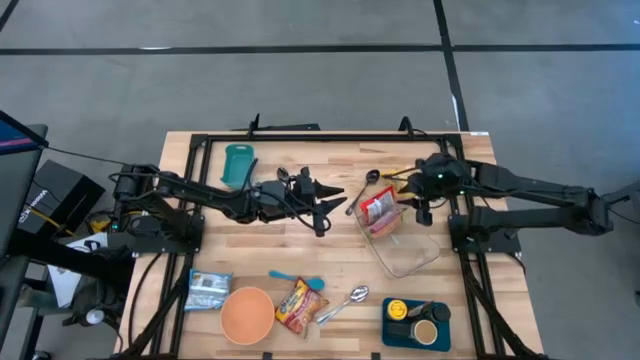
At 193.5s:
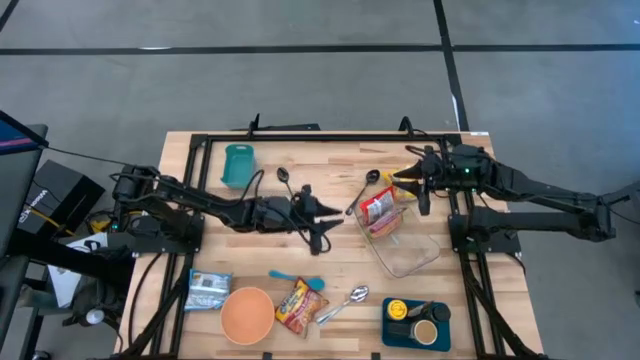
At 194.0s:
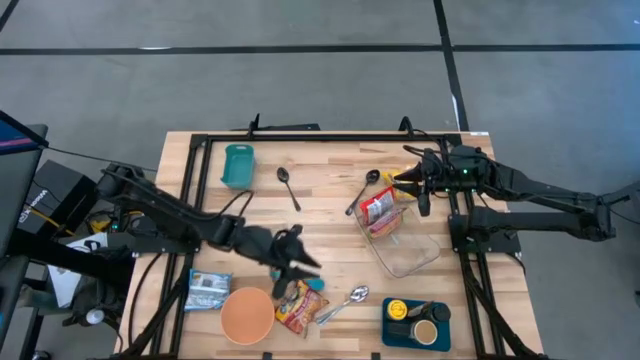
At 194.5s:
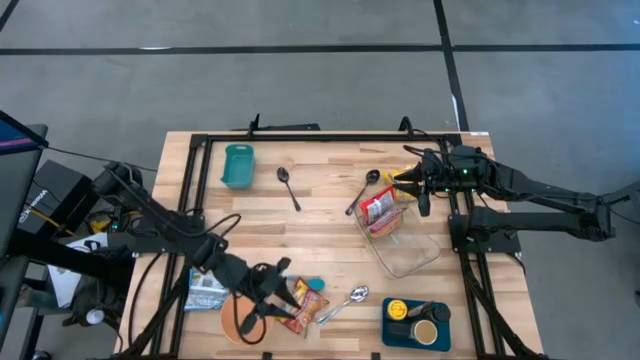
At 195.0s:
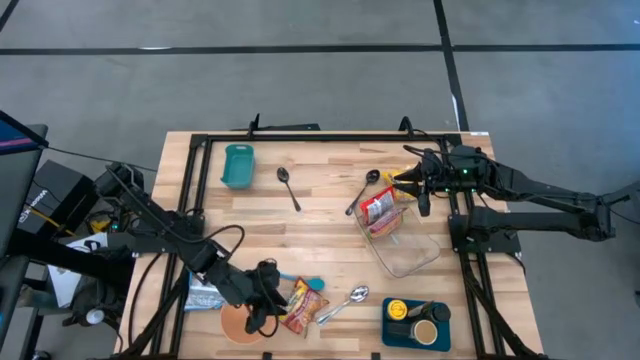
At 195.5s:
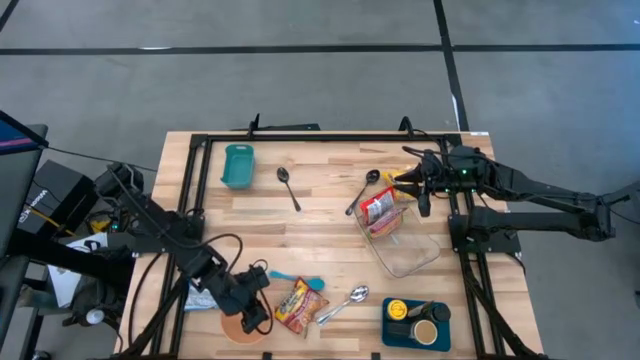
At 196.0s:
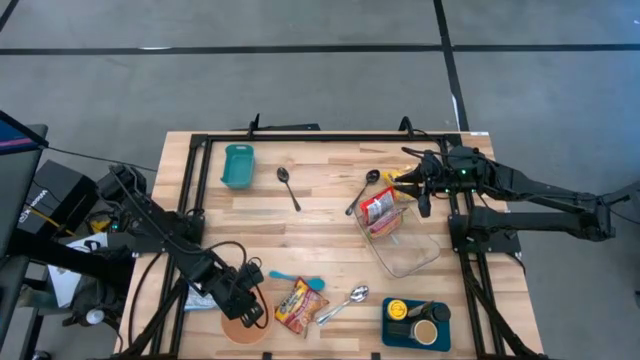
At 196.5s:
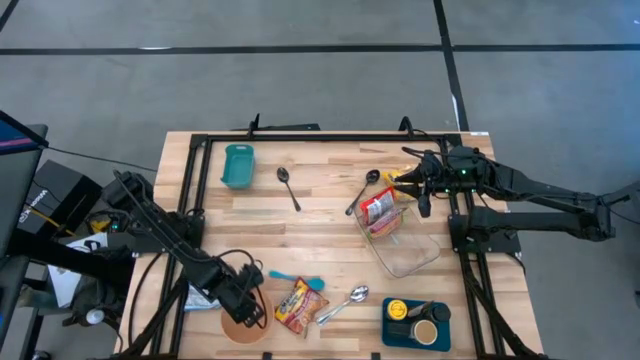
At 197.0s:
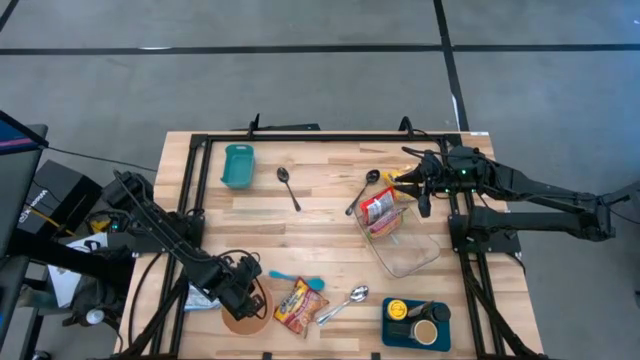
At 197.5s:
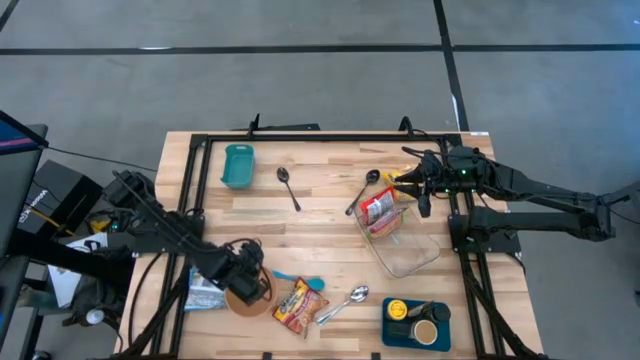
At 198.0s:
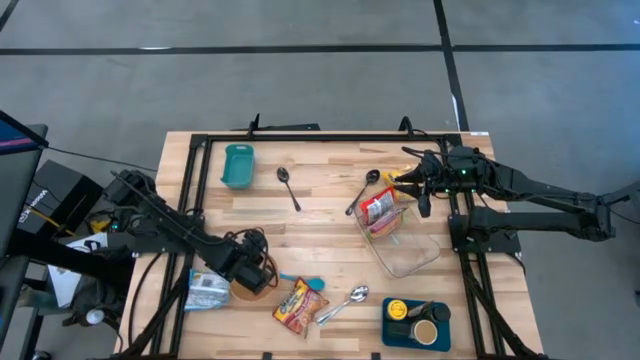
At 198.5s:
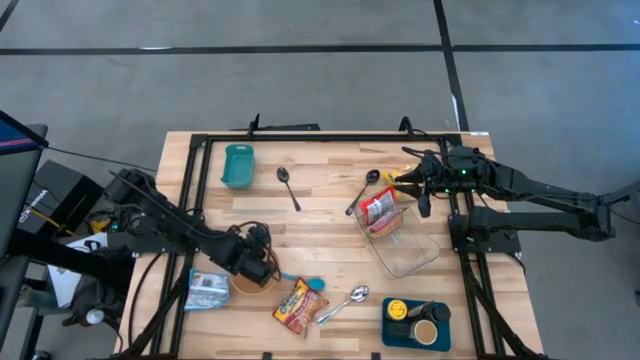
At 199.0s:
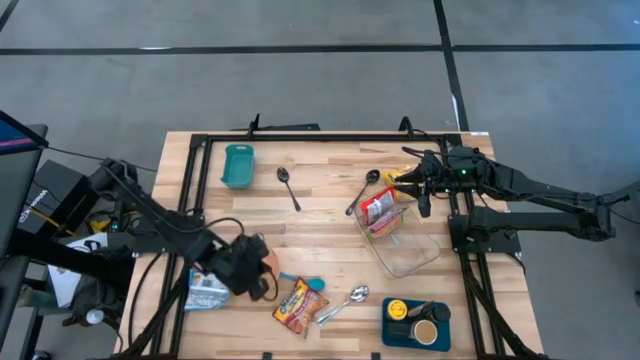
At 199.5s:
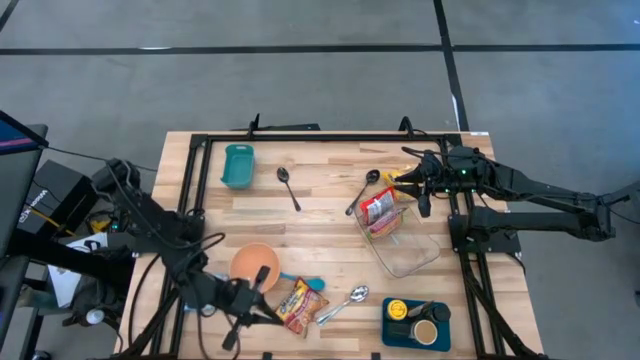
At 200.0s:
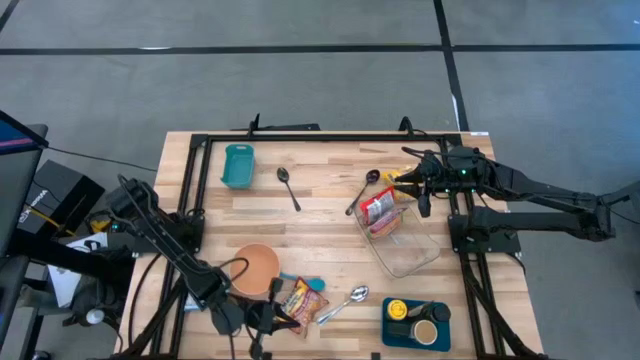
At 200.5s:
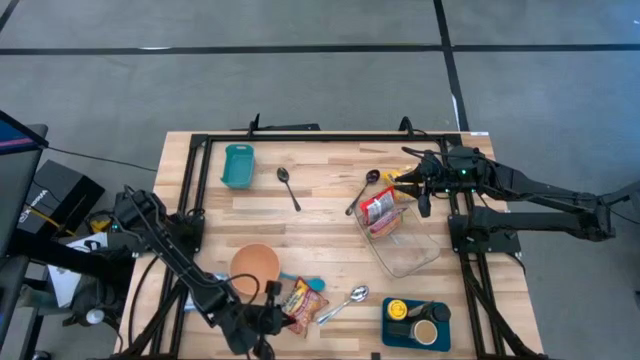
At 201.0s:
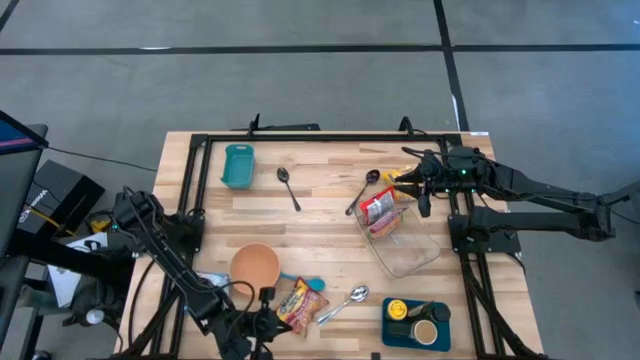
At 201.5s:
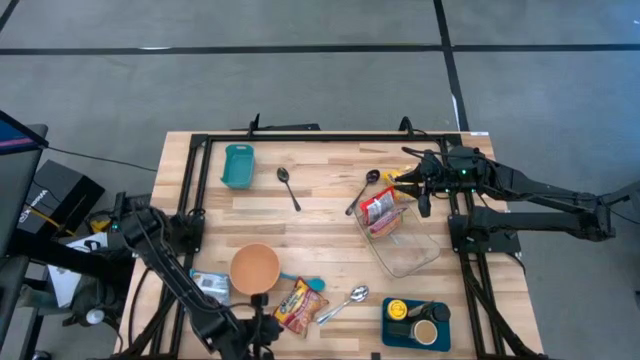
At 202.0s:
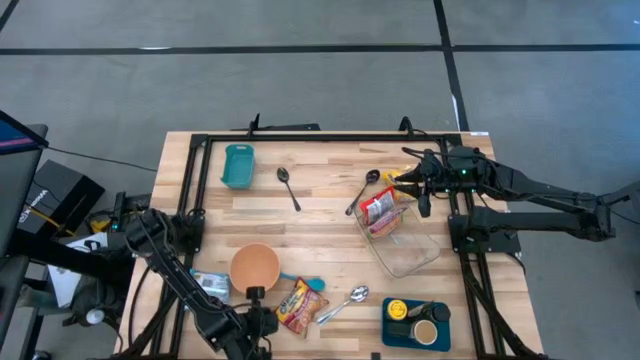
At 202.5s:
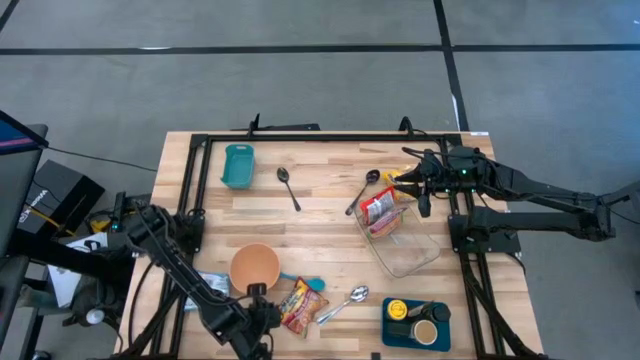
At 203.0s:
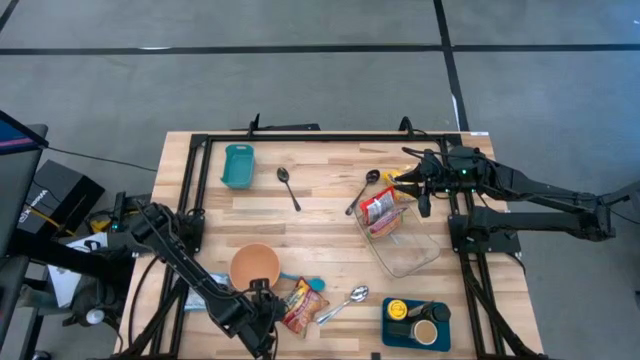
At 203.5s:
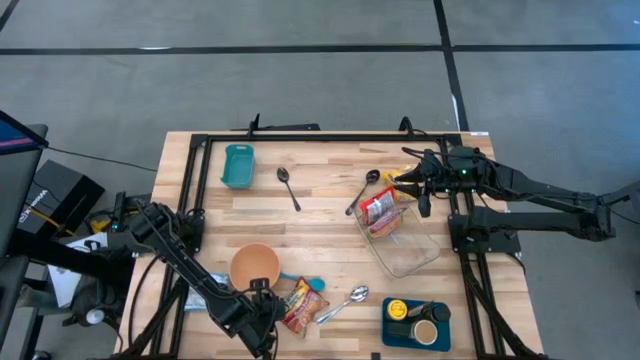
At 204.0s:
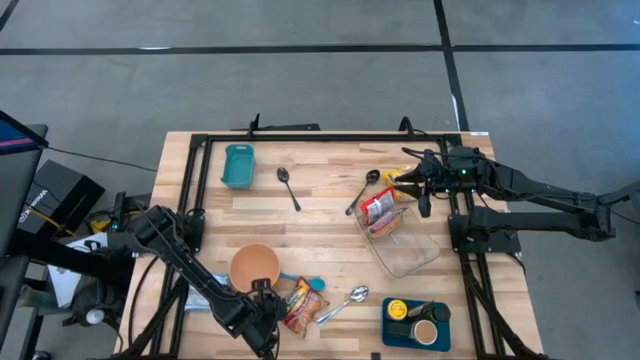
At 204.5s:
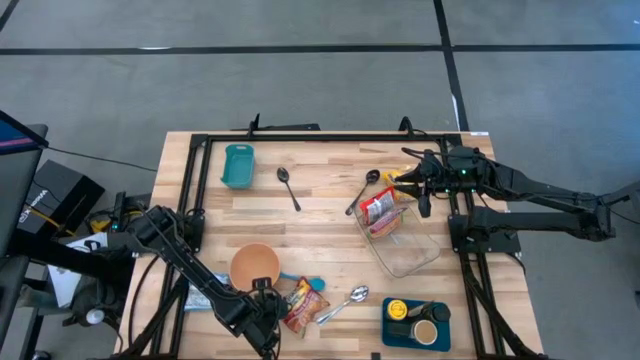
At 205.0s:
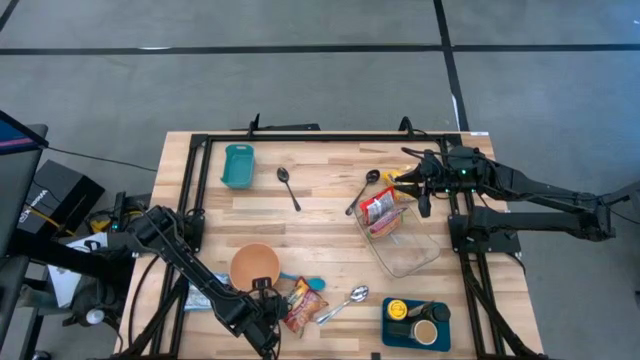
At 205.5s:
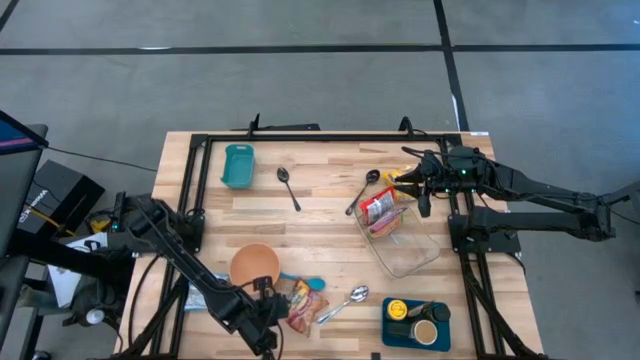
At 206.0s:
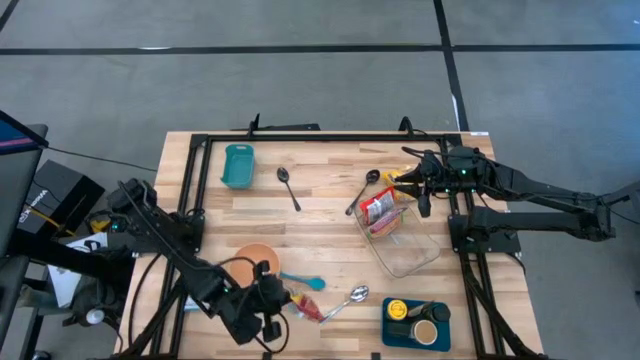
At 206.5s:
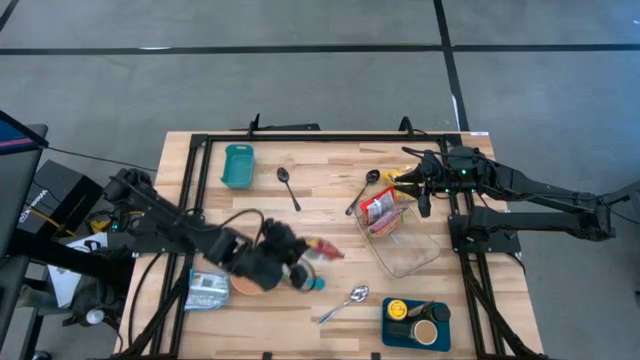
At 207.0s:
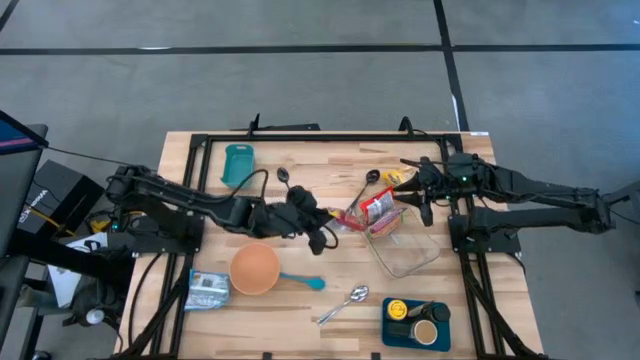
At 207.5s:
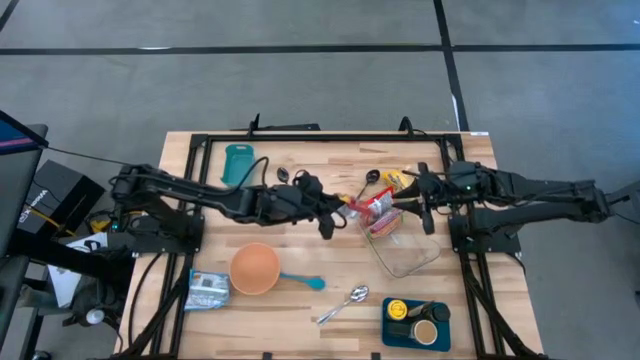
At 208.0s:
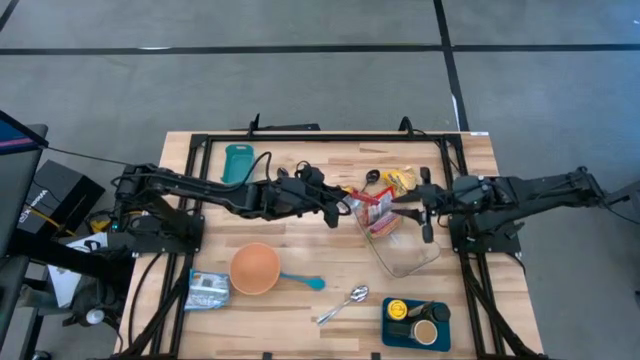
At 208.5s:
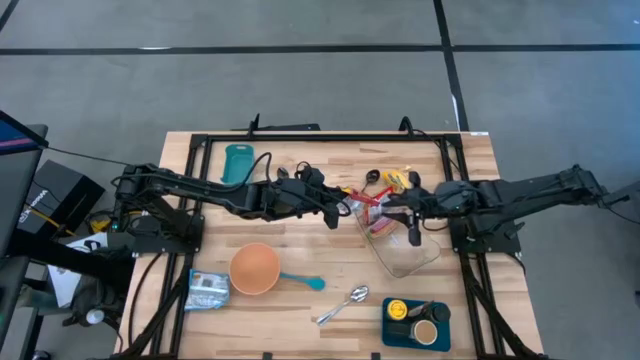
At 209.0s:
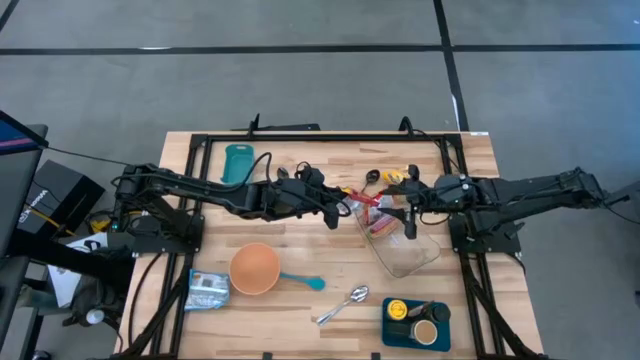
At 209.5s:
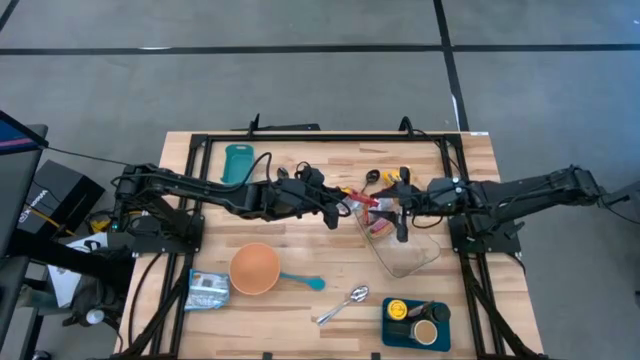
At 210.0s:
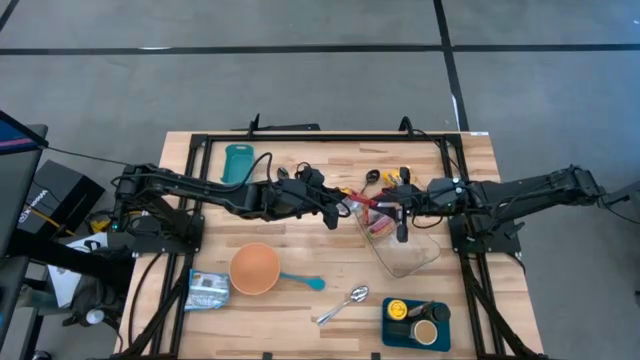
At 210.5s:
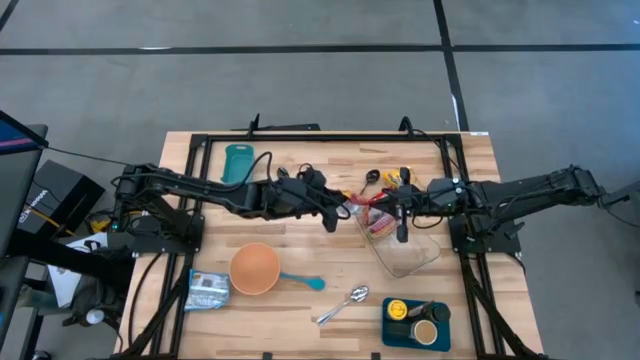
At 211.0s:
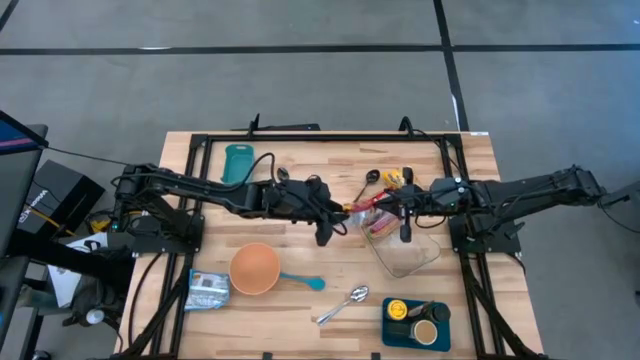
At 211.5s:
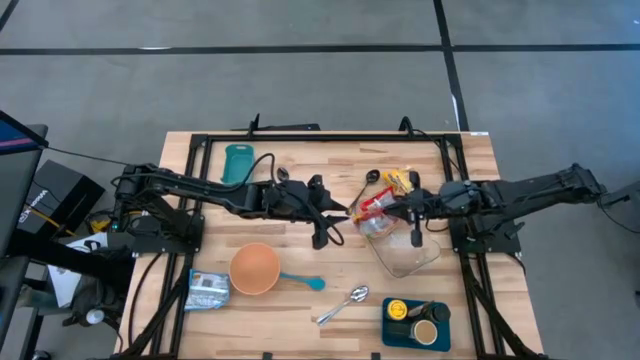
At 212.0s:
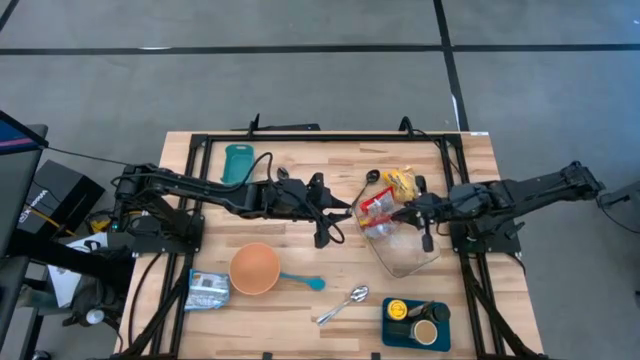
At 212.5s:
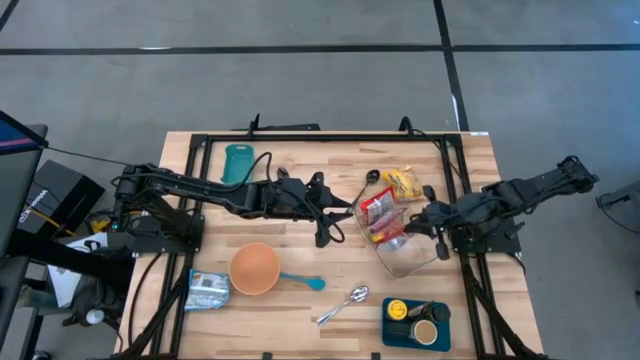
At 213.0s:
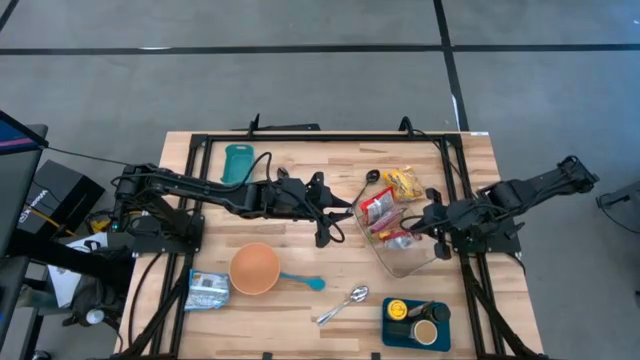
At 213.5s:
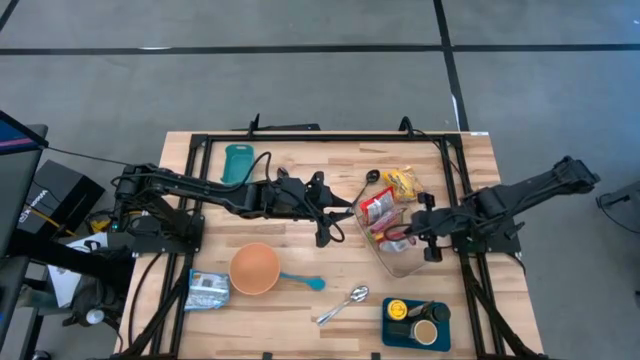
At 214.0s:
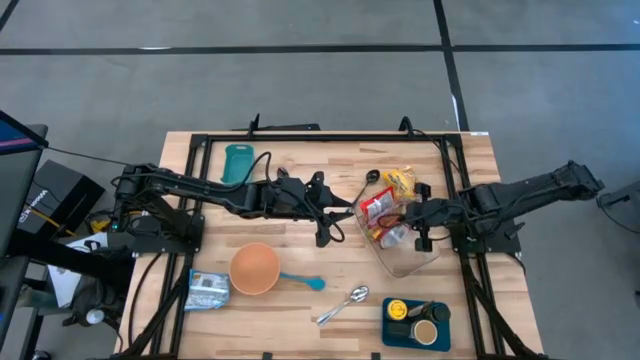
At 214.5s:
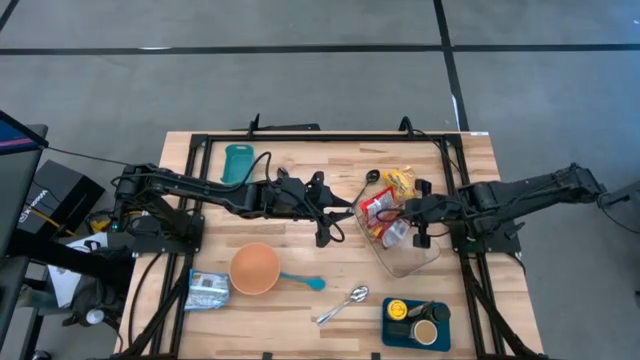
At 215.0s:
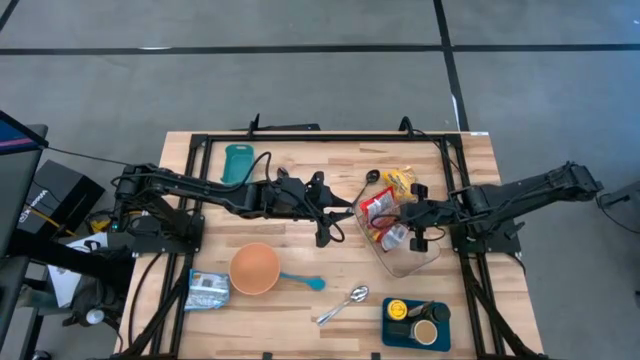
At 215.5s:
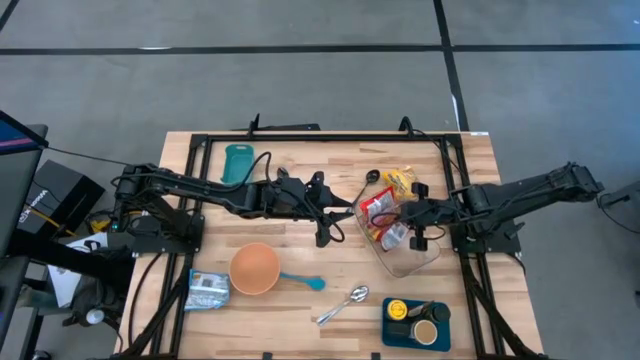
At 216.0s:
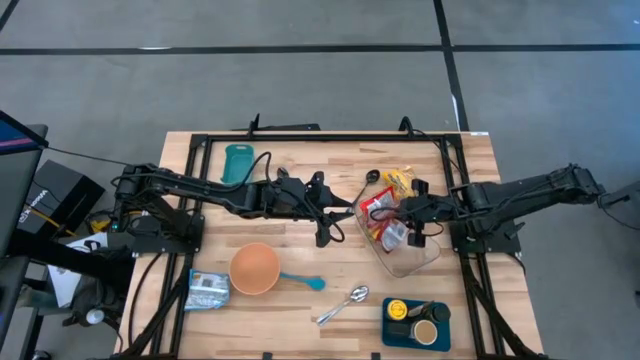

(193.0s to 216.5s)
Task: Pick & Place Food Item
Put the red noodle pack into the transparent bin
